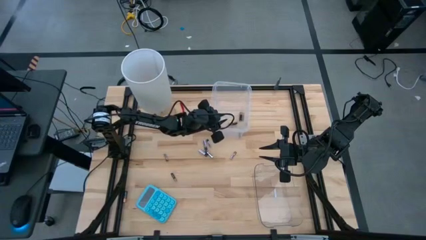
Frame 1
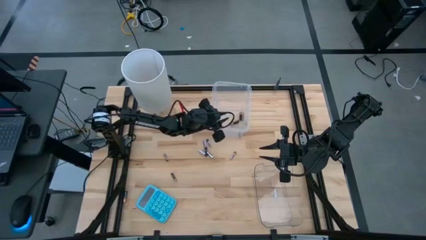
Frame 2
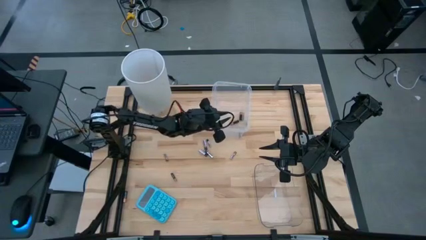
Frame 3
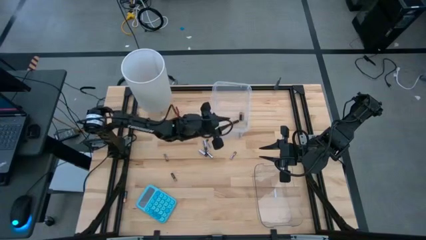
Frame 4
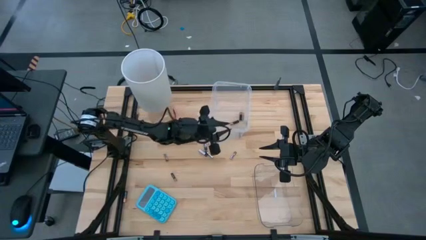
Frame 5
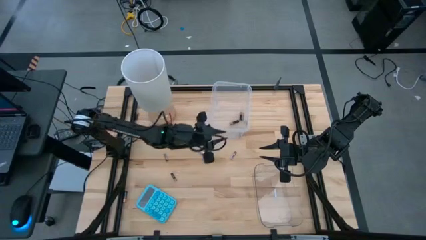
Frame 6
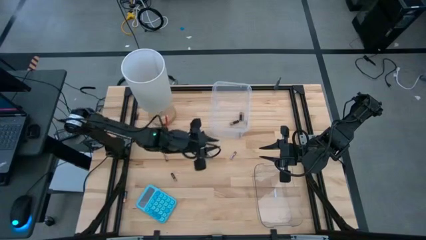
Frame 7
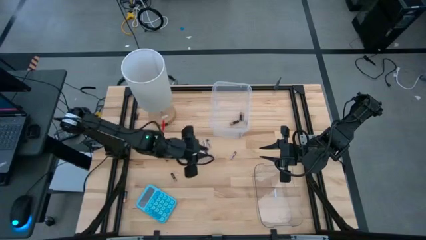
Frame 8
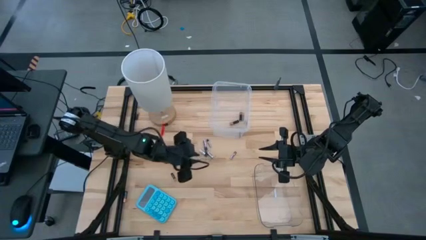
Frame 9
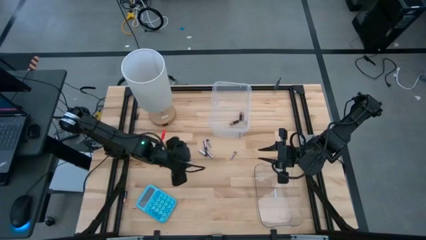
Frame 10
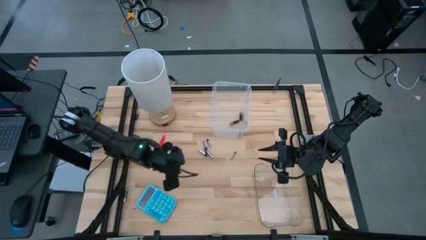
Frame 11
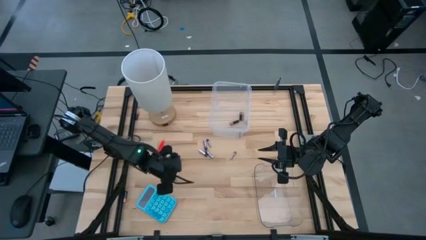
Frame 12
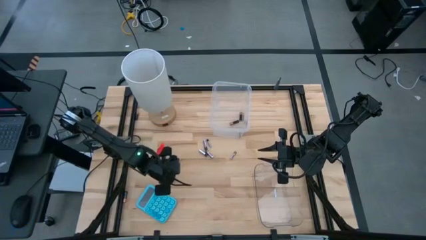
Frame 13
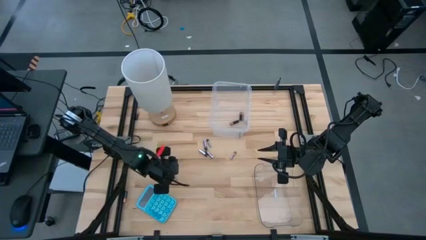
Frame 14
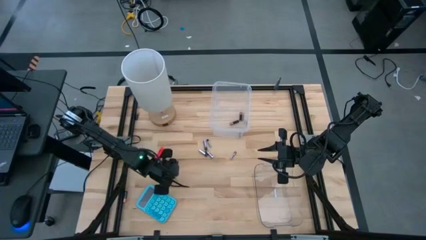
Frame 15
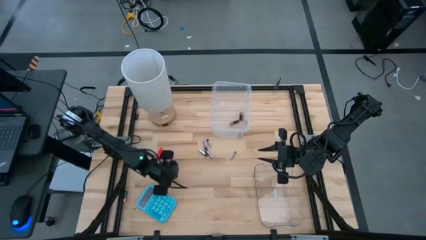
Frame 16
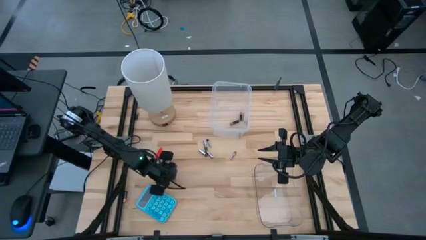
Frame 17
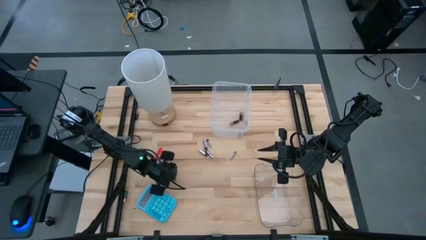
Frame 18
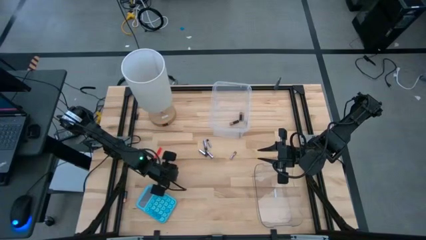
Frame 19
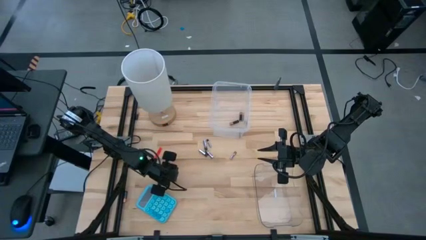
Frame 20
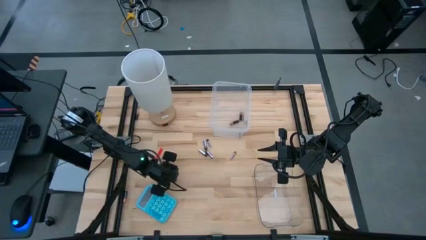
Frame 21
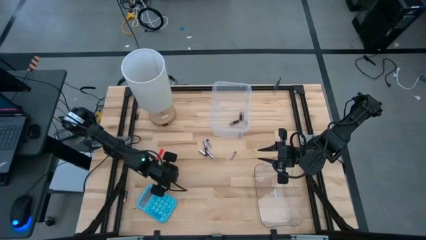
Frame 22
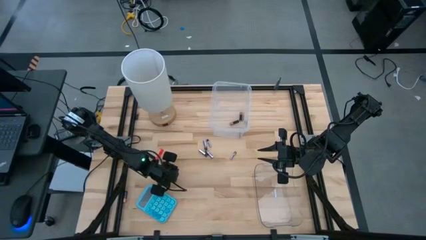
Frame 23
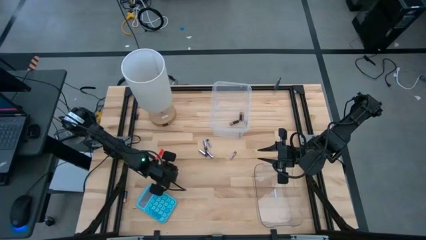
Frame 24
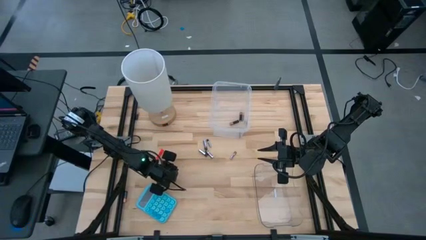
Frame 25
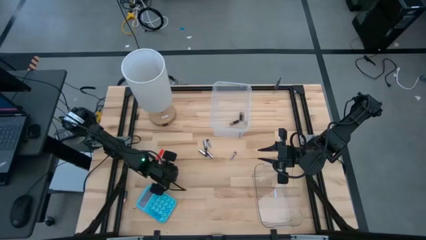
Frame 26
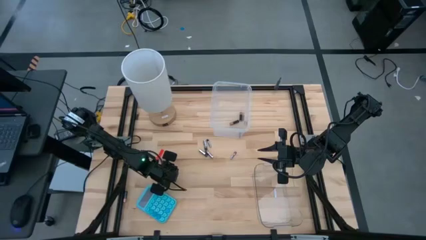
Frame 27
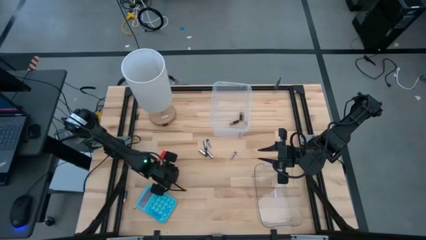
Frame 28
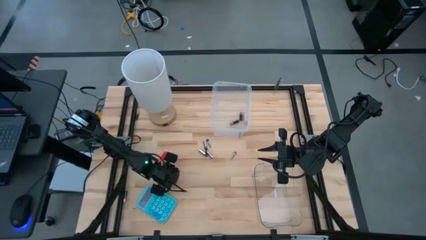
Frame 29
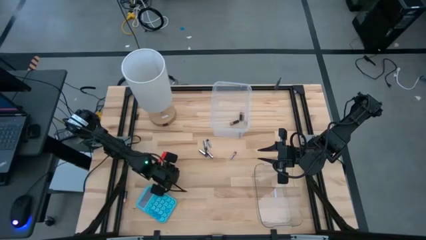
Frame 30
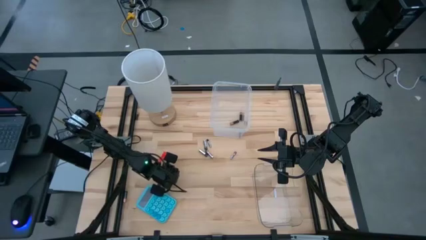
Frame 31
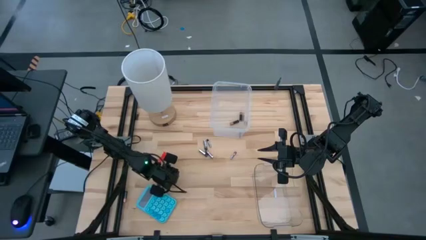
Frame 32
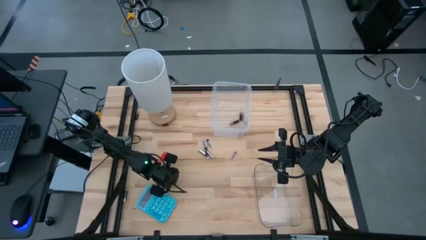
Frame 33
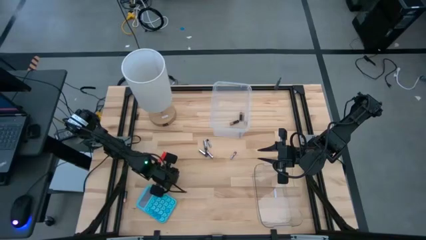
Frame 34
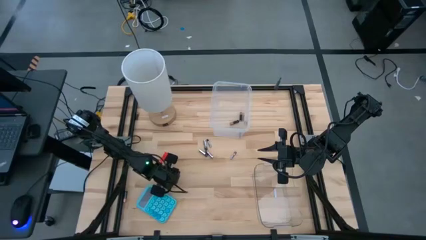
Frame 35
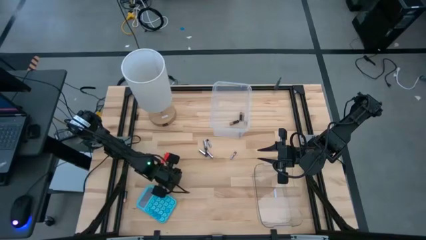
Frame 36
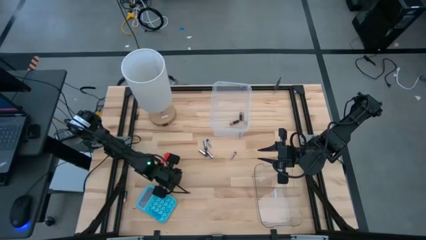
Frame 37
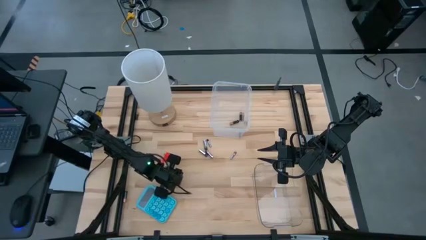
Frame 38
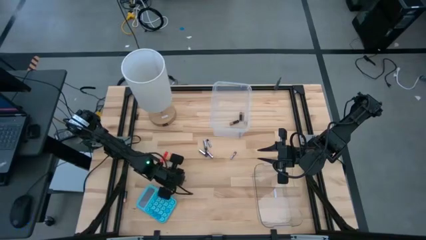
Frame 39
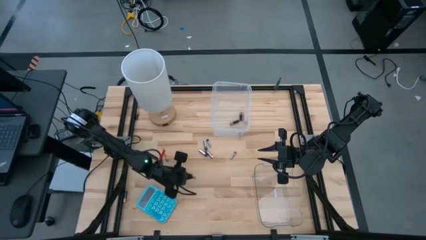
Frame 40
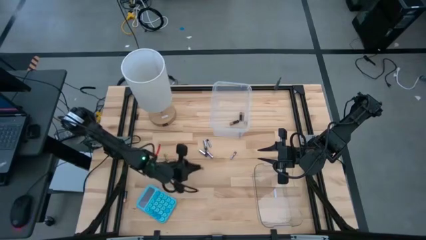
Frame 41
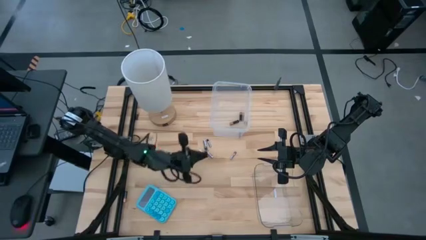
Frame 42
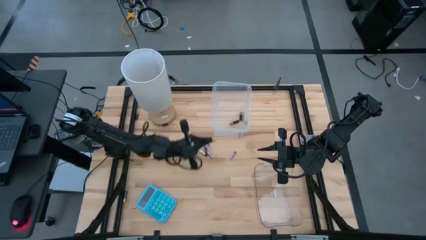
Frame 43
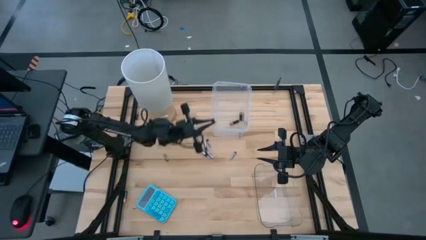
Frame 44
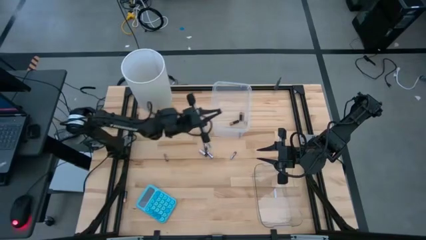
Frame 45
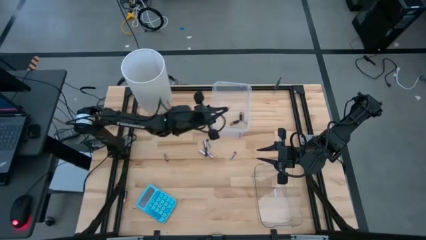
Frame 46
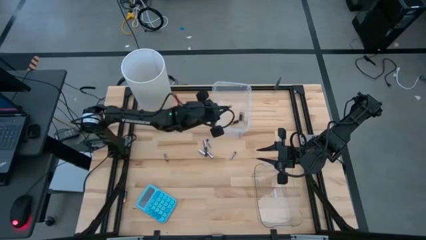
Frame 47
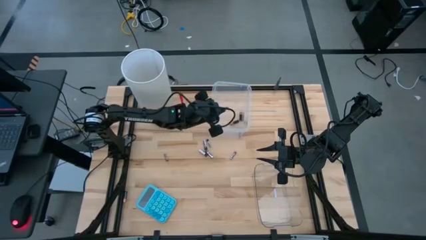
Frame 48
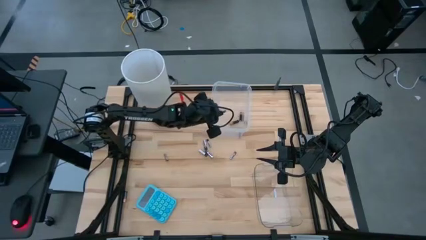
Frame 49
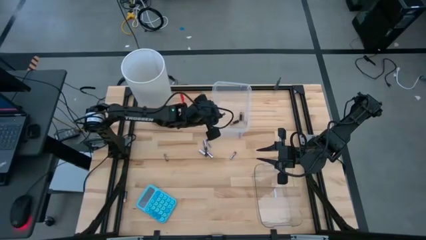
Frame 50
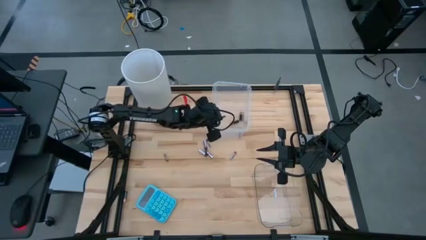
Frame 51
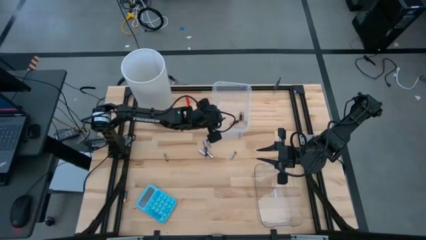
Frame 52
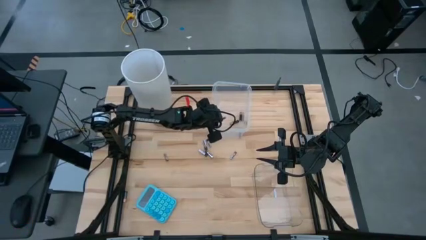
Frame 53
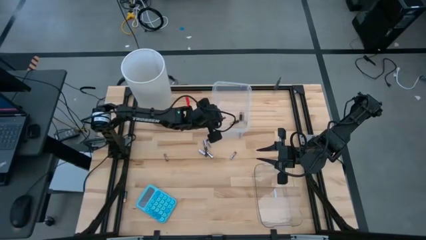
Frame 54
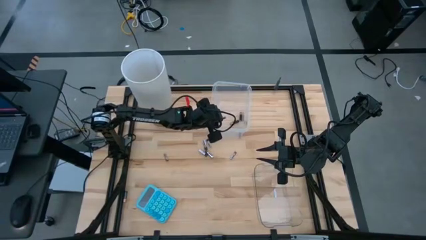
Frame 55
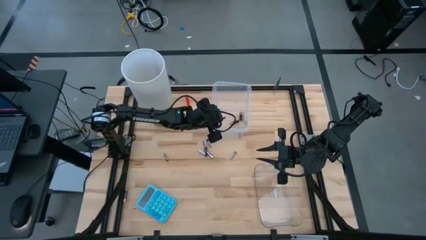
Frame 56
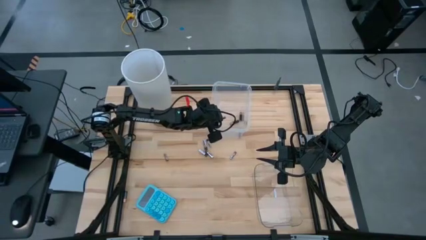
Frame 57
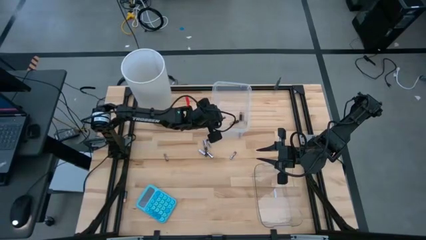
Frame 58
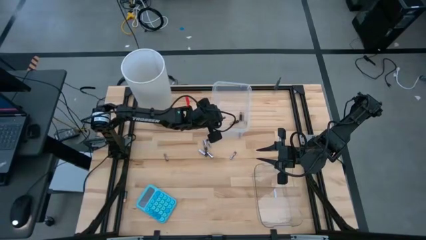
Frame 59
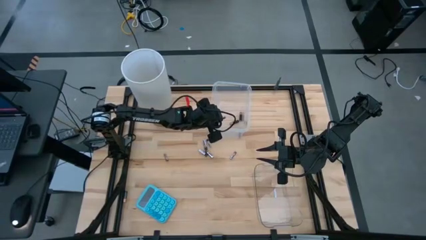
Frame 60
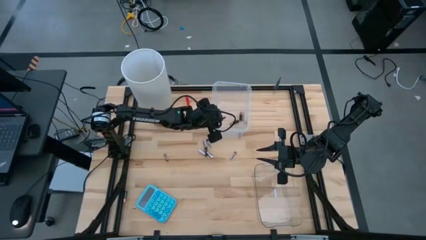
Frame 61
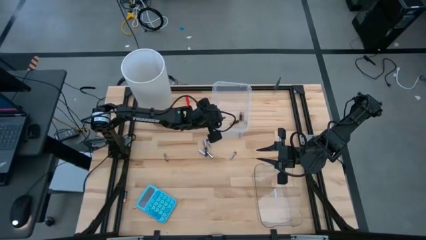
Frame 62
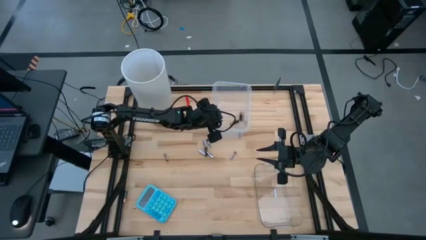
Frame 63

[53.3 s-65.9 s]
Task: Sort batteries
Put the brown battery into the top transparent bin

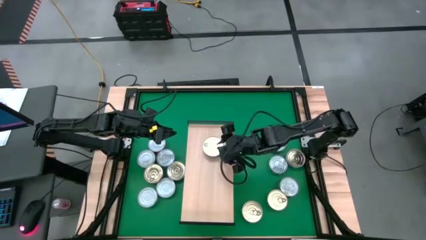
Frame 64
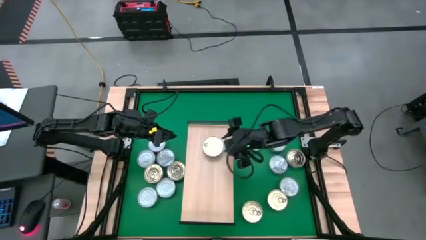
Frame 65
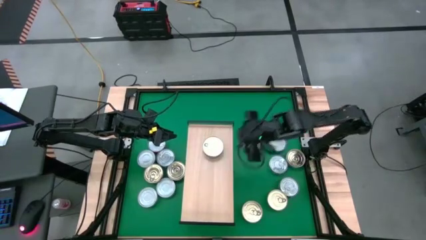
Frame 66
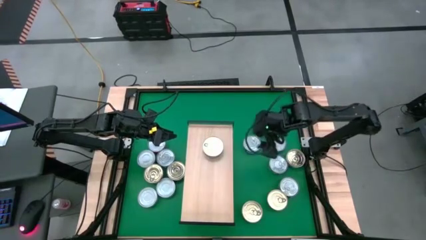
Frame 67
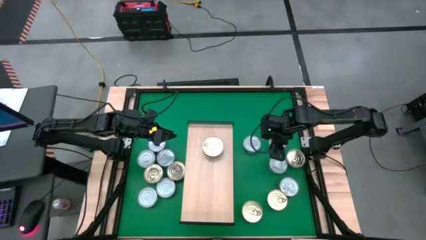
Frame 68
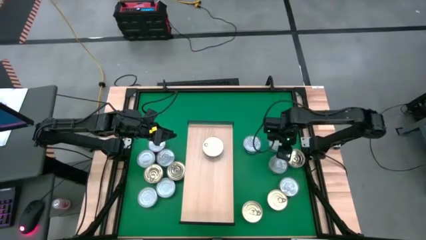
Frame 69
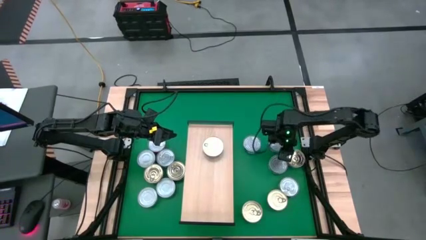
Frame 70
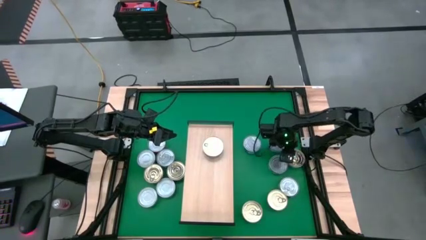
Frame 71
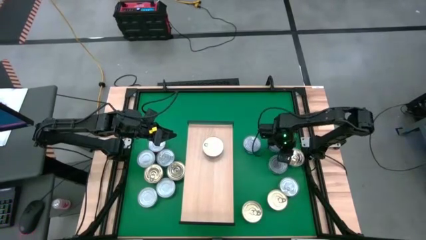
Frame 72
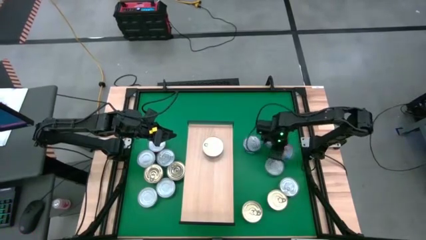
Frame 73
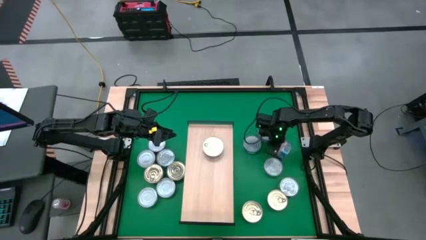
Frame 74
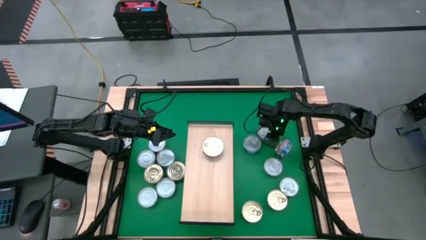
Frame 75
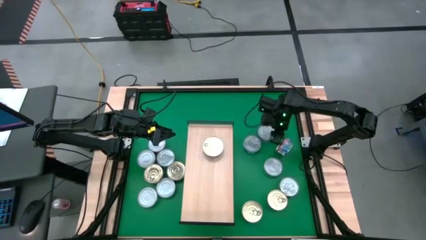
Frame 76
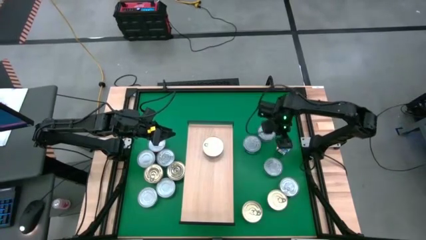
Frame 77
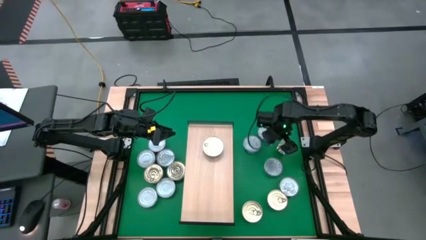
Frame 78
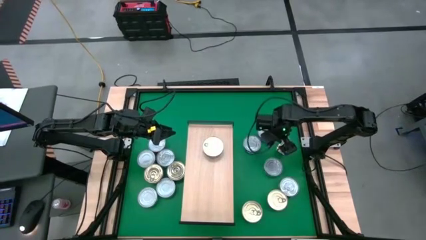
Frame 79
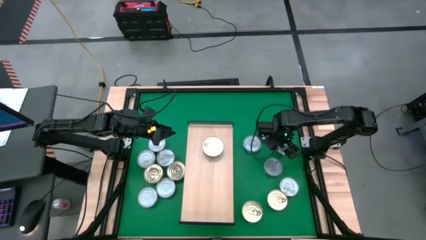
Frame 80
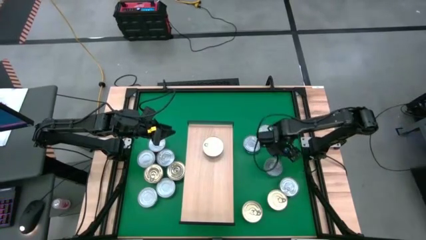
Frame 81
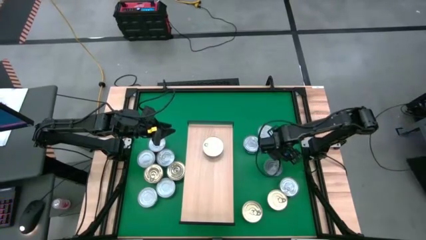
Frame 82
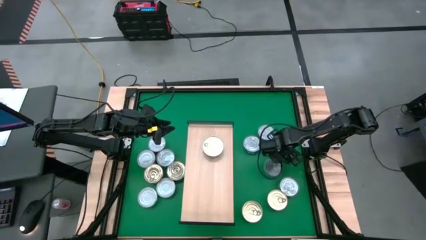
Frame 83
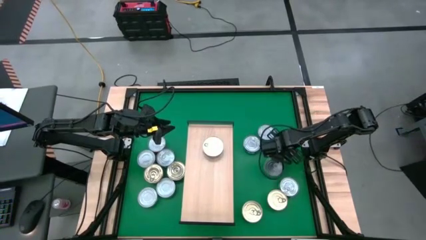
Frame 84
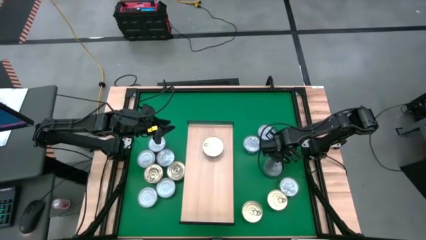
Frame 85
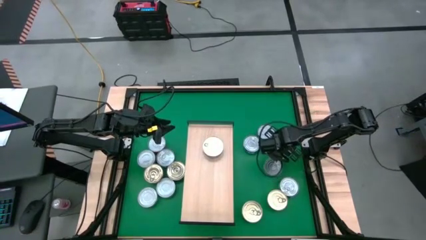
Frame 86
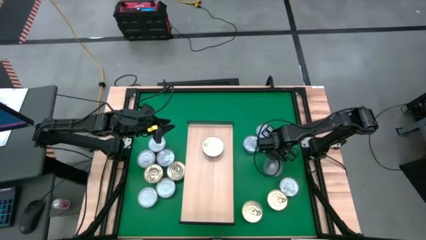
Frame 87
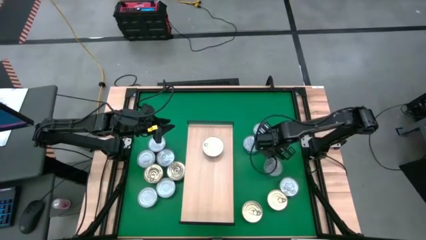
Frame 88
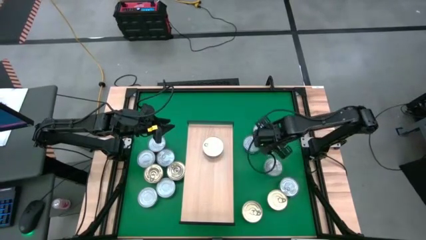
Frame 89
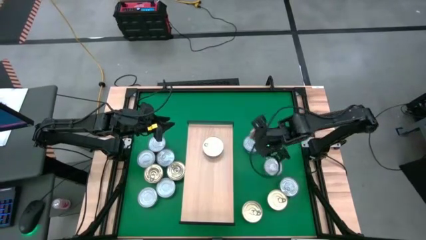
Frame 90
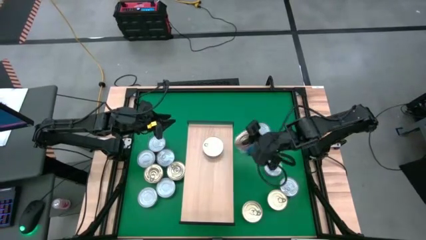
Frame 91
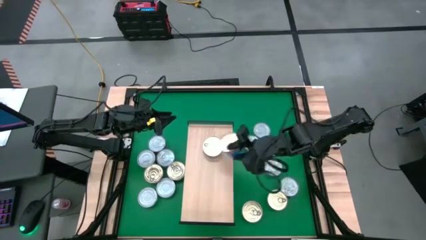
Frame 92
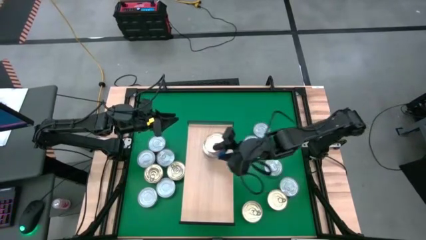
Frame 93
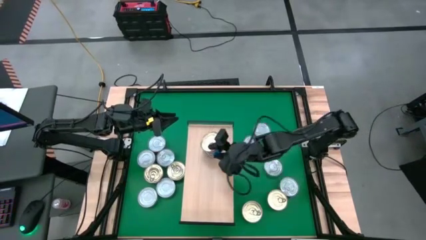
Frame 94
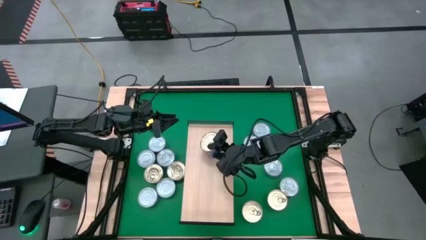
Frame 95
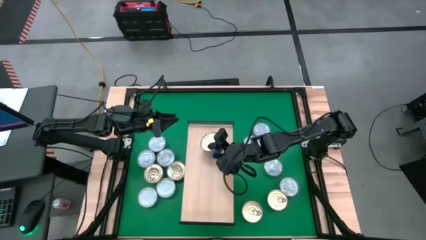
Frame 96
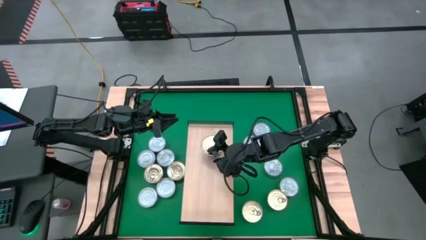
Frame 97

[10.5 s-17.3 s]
Task: Stack canned seafood by type on shelf
Stack the blue pink tuna can on top of the other blue pink tuna can on the shelf
